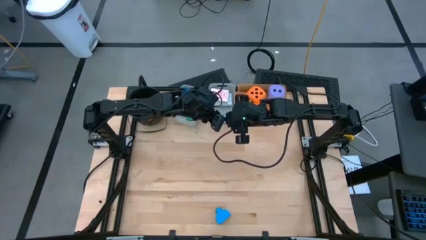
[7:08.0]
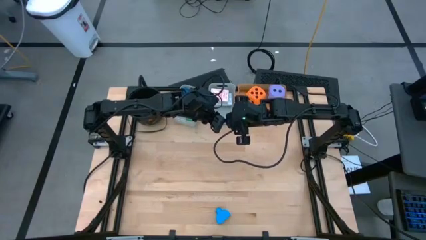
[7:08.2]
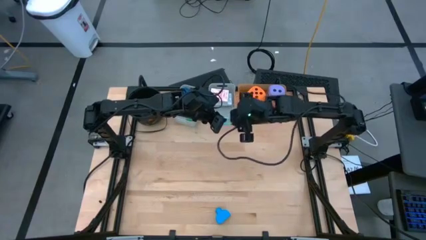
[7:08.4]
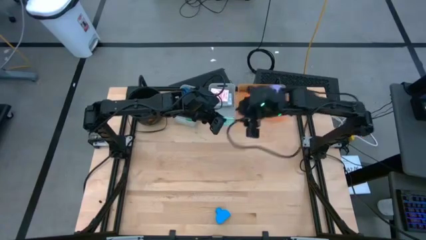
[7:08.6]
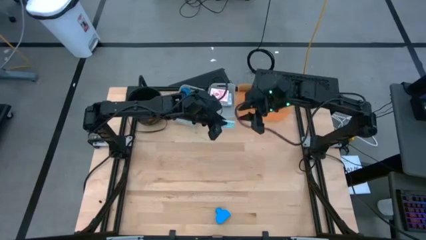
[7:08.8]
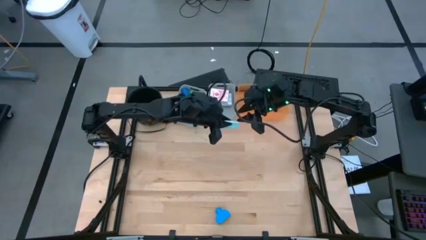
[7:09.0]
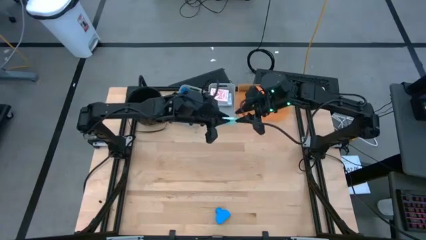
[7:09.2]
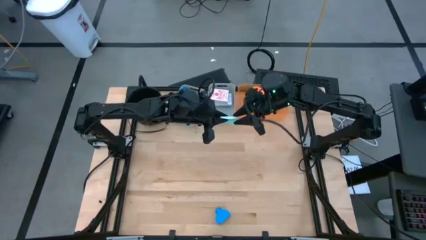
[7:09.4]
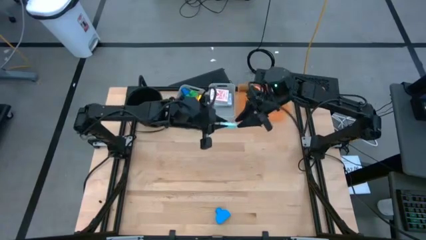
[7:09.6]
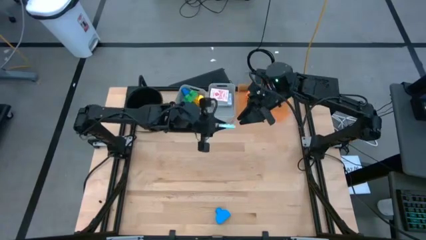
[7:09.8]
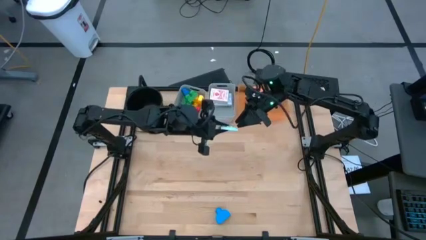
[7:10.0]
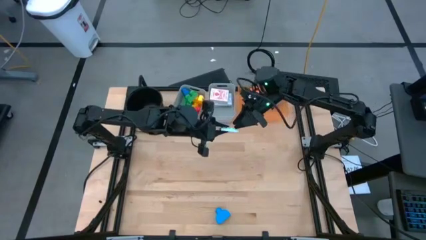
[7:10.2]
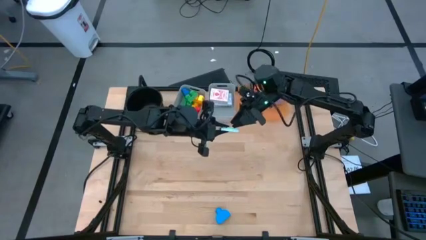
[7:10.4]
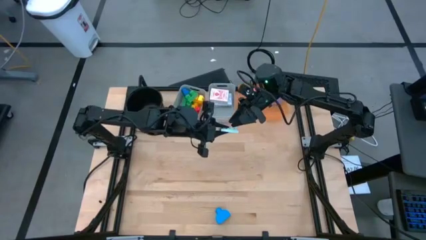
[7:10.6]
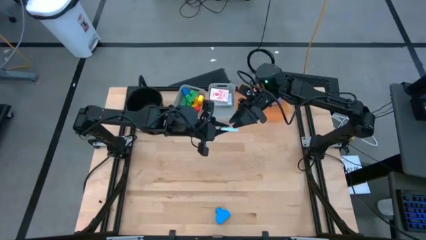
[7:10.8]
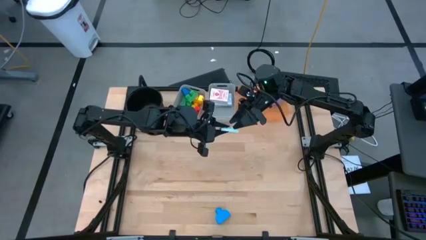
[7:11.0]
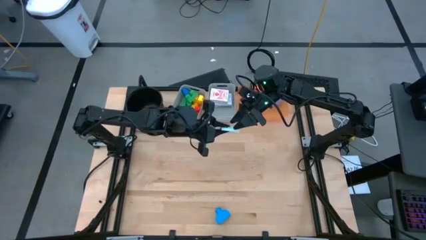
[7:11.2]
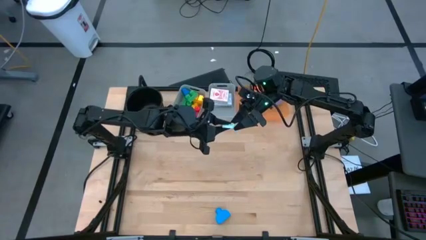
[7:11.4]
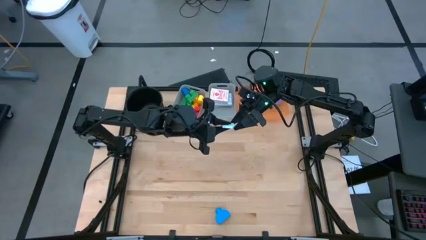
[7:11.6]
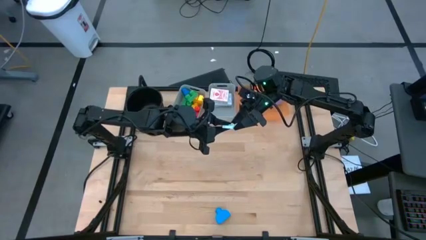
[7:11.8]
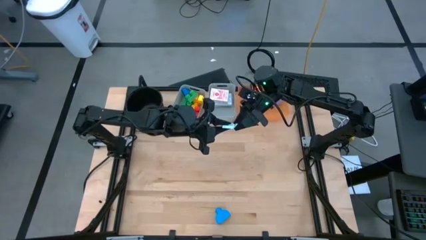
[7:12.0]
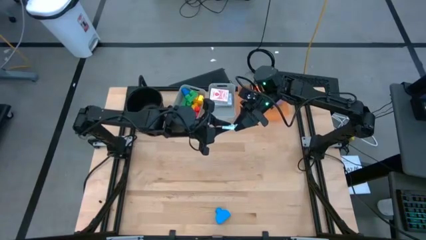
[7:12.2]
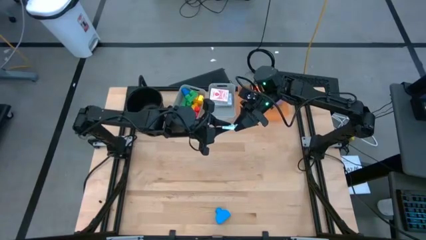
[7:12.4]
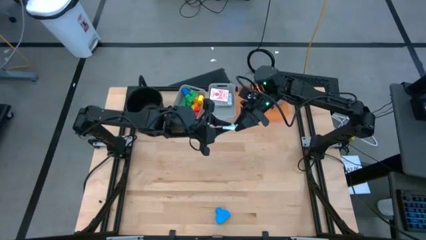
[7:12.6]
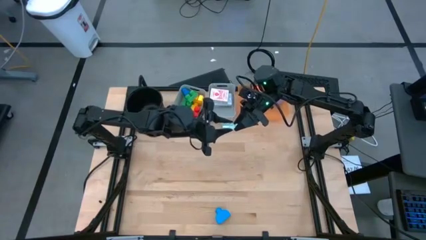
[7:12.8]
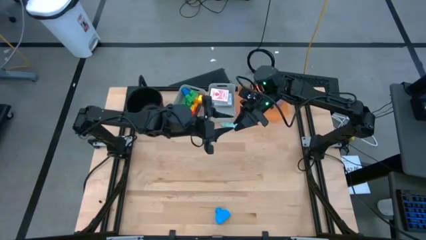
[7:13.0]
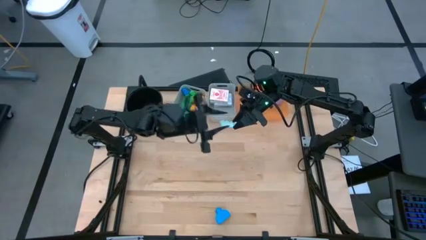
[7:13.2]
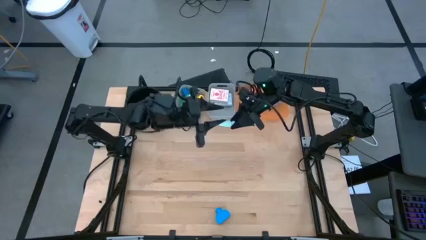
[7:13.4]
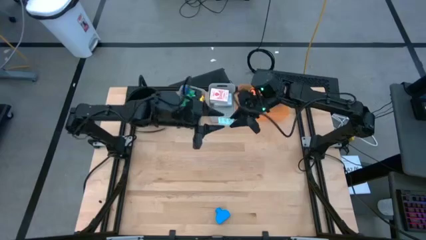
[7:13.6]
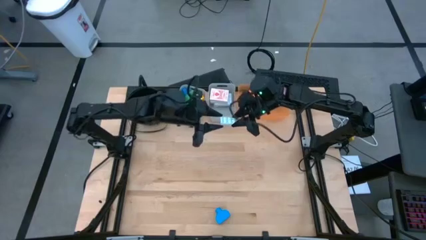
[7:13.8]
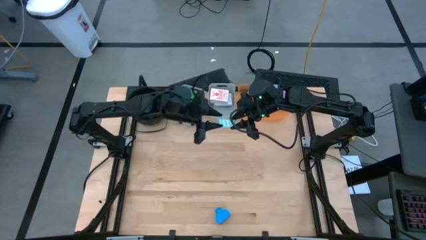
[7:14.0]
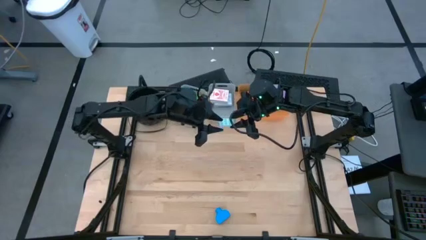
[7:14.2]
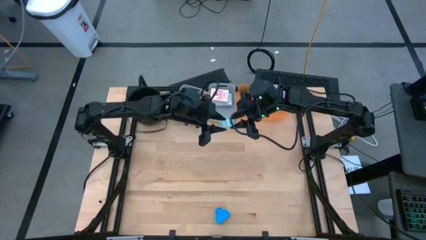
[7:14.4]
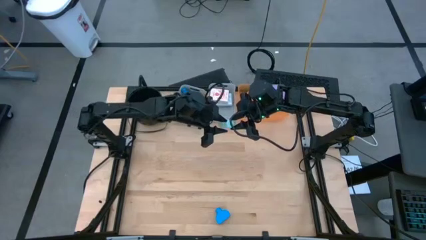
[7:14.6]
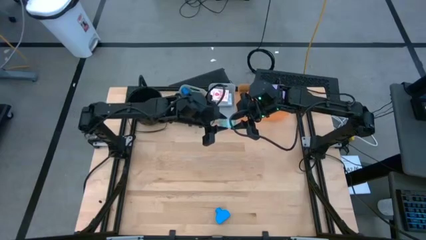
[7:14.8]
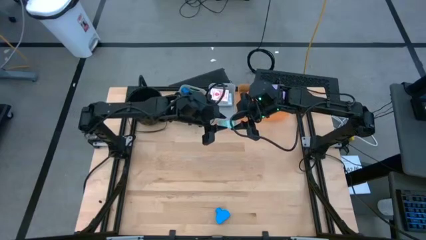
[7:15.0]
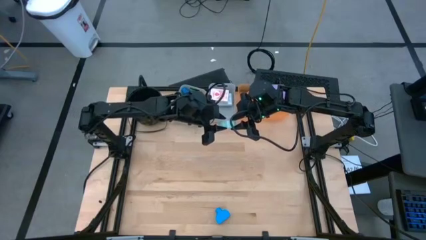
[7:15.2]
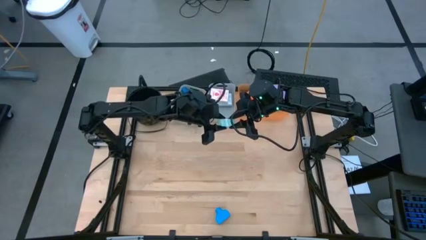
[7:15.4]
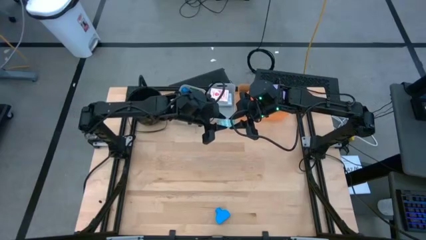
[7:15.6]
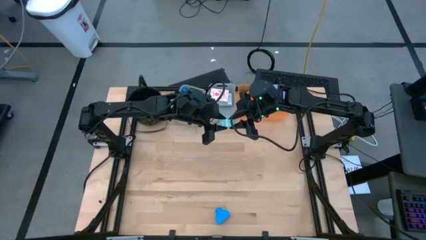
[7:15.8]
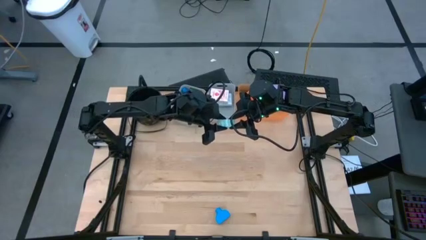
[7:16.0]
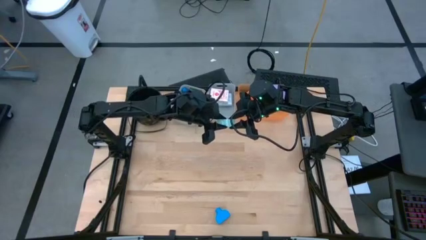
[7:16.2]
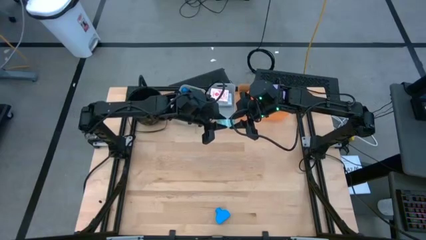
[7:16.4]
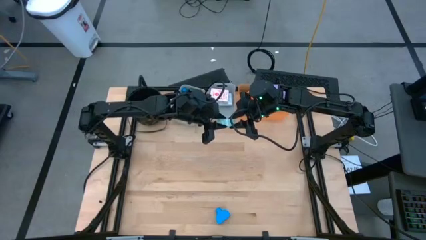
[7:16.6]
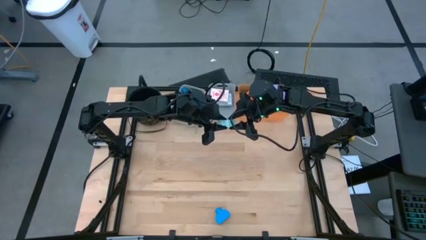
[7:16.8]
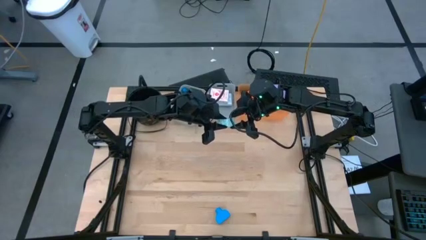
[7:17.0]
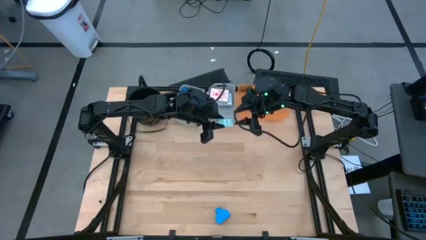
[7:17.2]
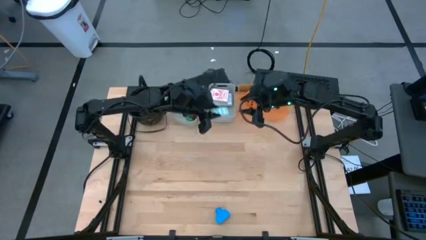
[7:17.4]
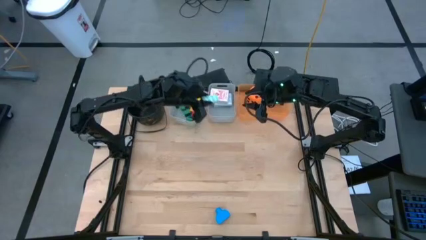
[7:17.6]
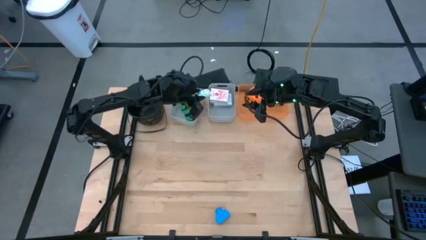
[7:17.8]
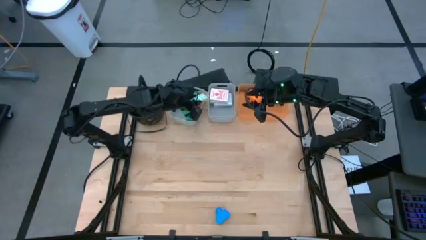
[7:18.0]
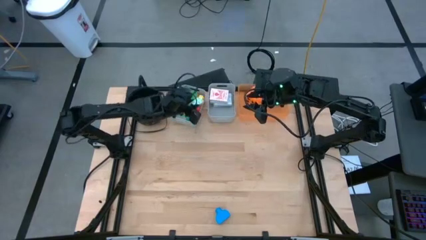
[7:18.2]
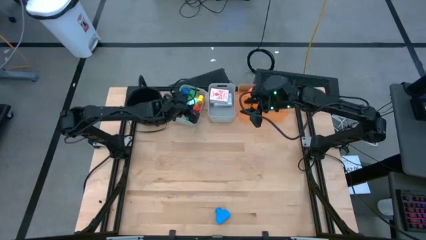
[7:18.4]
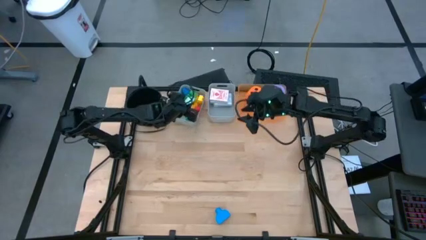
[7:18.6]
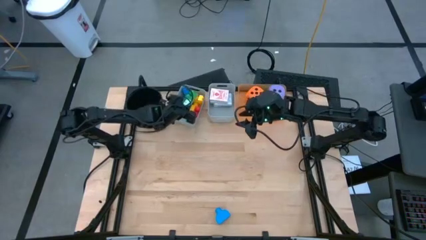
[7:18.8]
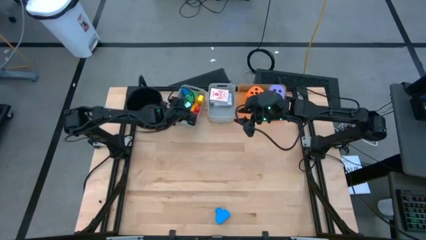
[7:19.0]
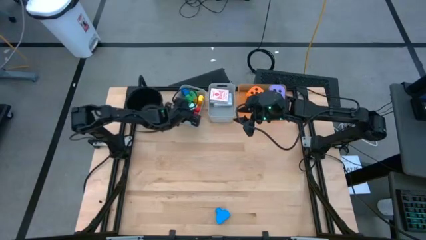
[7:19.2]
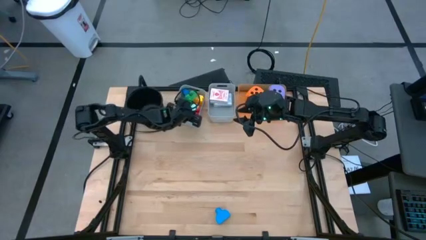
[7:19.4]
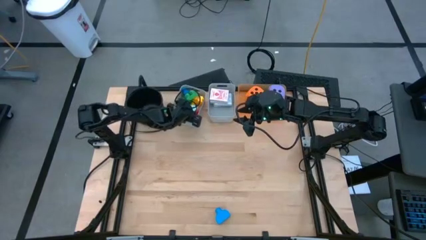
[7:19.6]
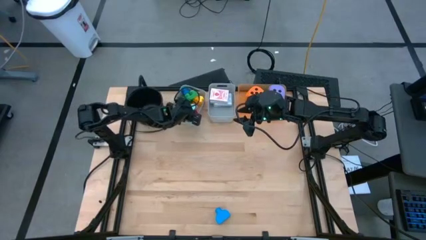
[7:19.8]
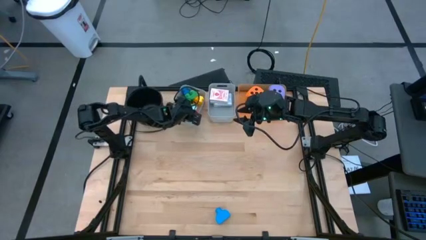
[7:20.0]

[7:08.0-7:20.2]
Task: Pick & Place Toys
Put the light blue game piece into the left gray bin

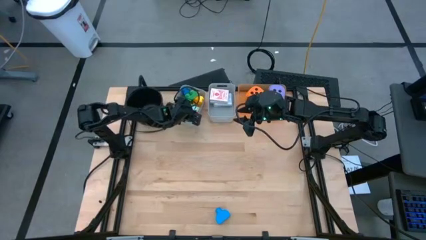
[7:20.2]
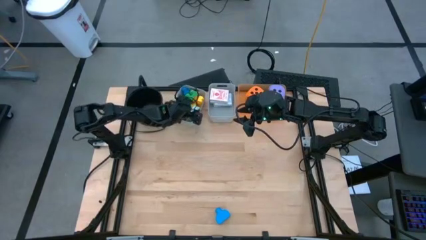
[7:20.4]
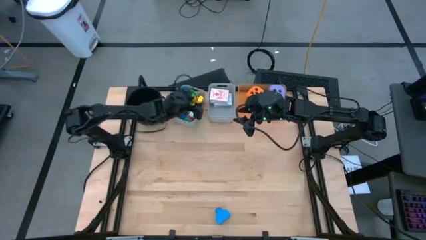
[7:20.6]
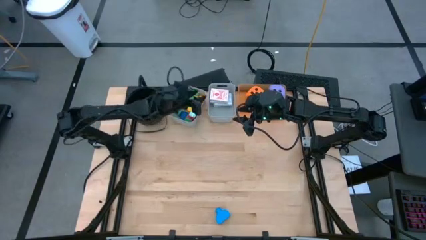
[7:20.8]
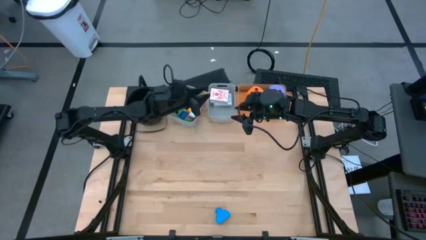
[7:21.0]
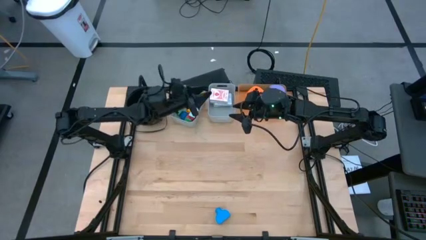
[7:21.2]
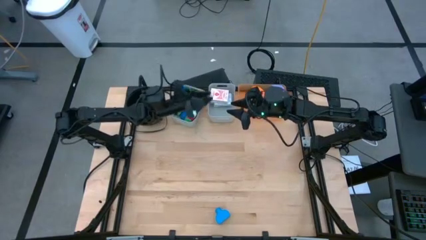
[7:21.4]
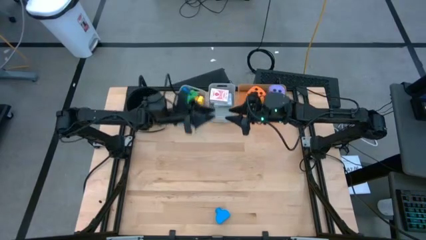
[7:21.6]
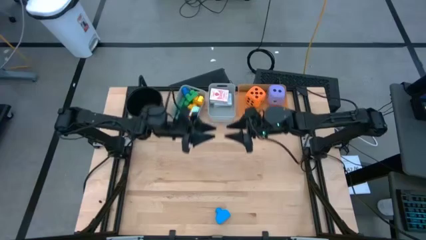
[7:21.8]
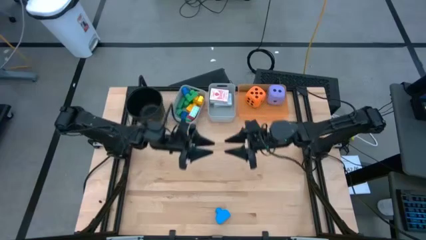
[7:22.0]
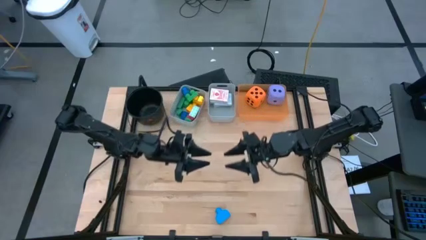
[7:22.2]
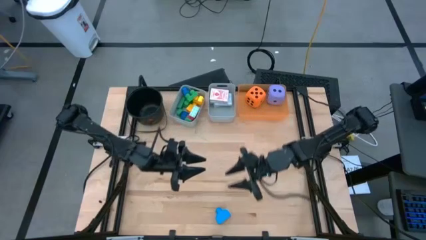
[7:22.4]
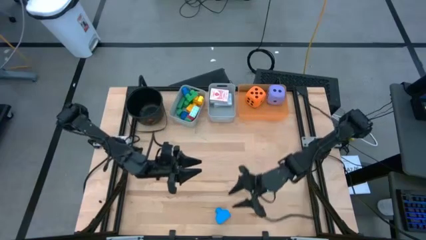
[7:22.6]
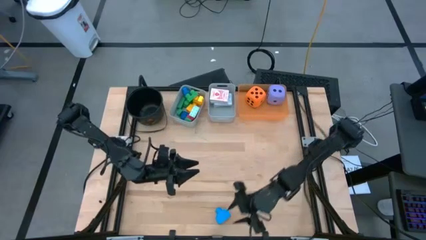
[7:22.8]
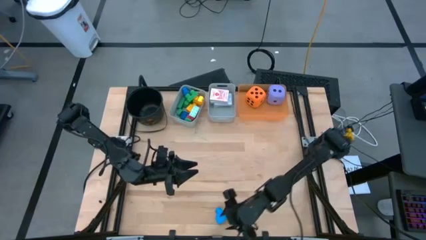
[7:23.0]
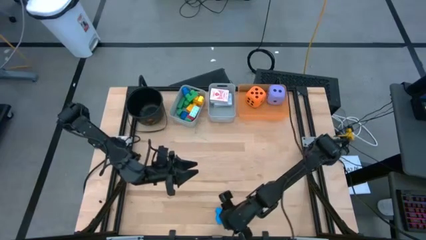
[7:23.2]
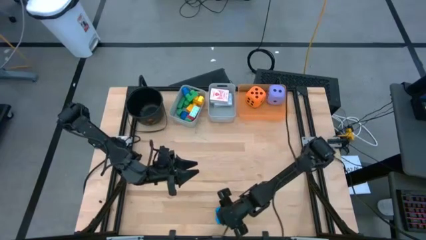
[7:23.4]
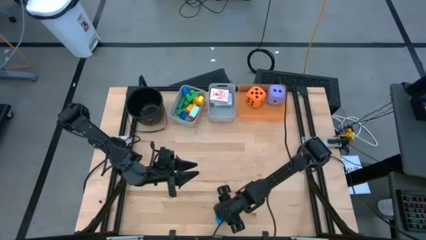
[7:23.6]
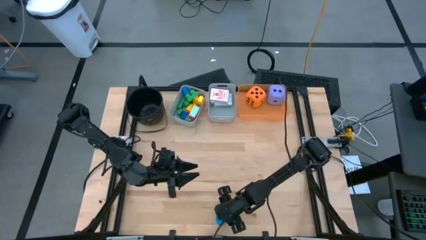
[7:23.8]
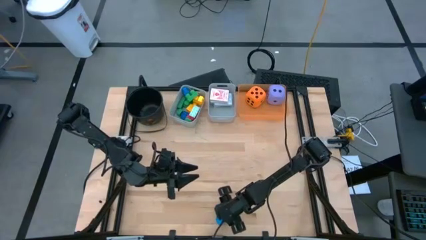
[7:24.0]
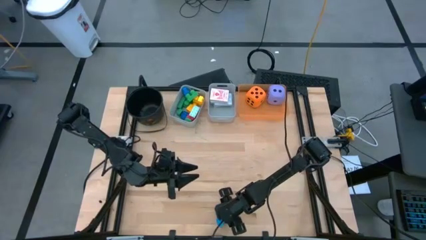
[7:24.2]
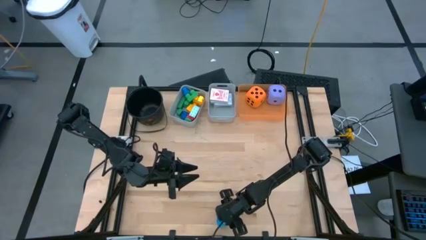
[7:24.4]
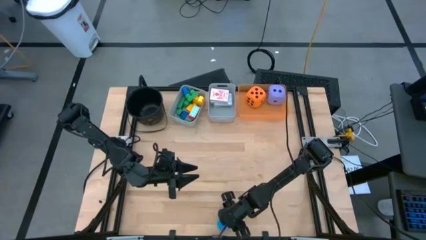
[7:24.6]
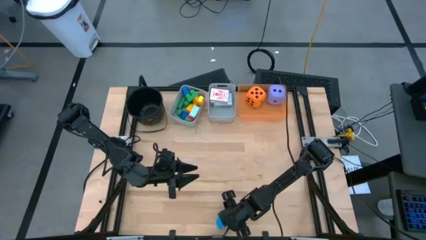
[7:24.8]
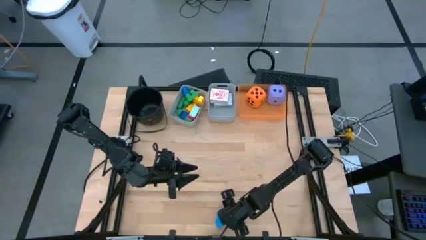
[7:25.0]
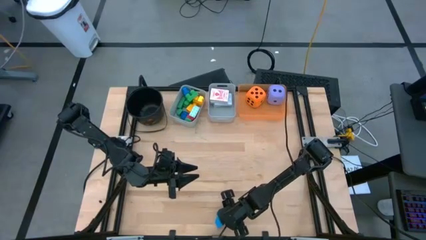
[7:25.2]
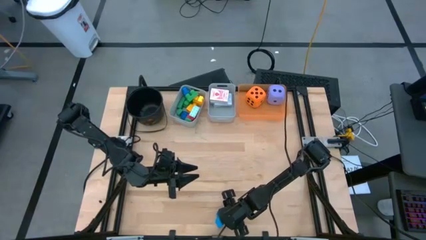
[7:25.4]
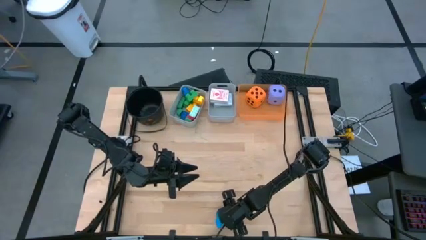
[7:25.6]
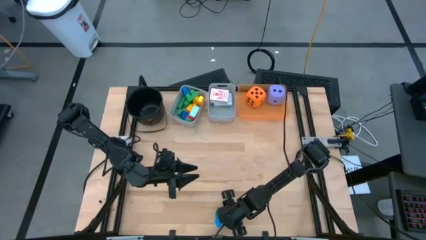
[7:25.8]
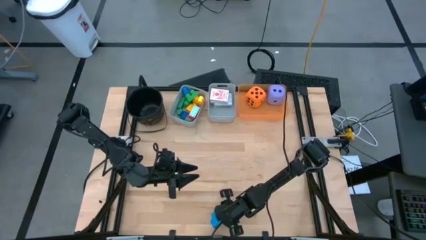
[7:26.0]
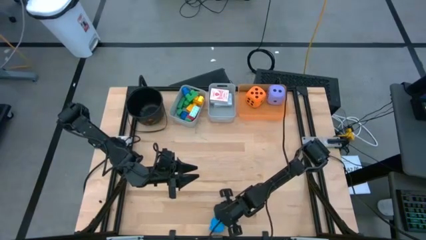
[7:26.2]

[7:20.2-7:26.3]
Put the blue game piece into the left gray bin
